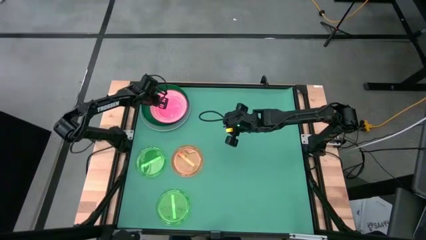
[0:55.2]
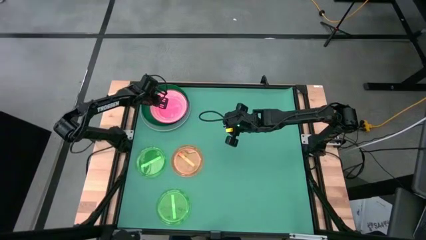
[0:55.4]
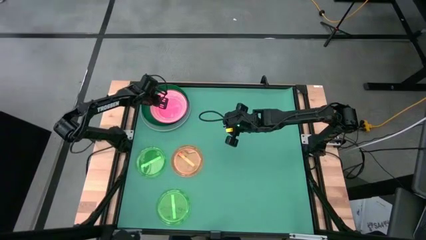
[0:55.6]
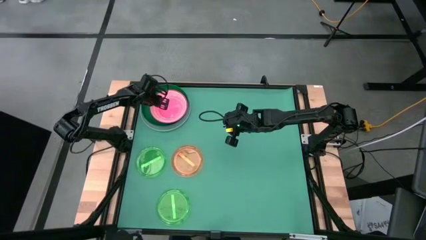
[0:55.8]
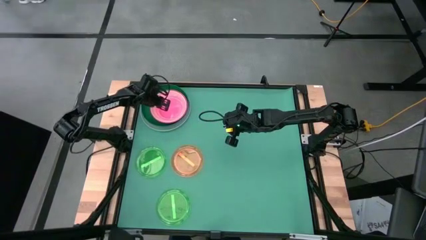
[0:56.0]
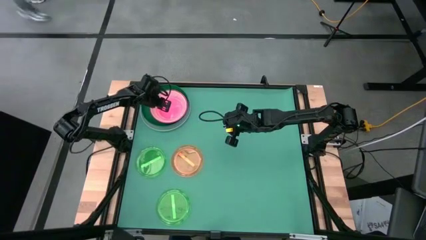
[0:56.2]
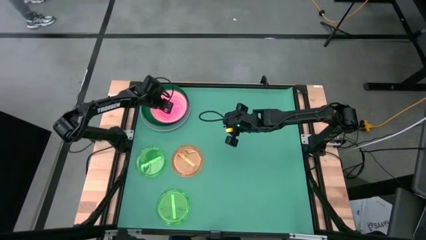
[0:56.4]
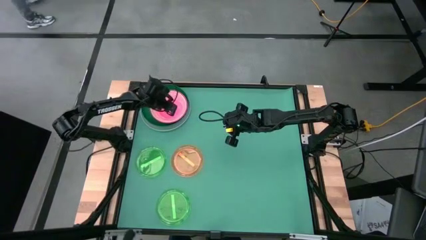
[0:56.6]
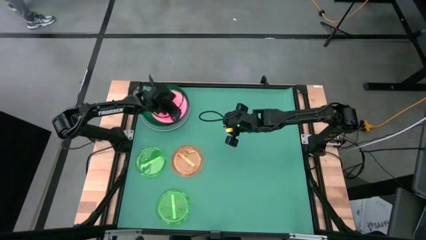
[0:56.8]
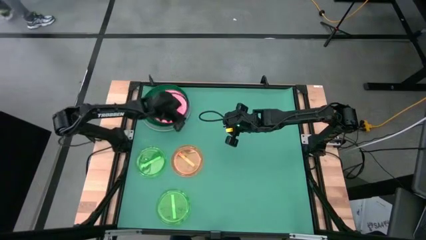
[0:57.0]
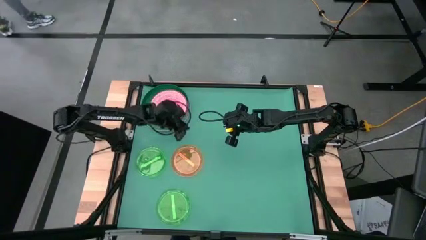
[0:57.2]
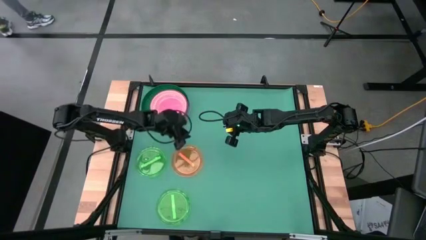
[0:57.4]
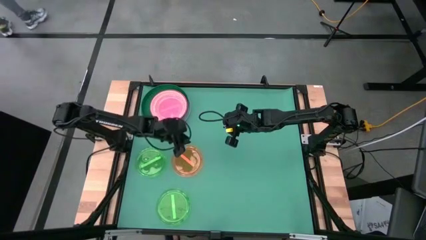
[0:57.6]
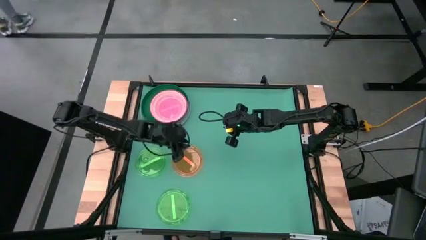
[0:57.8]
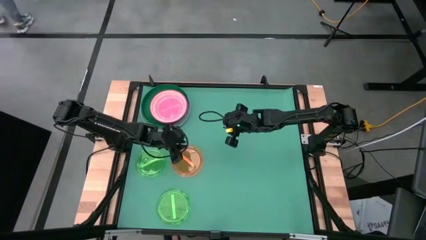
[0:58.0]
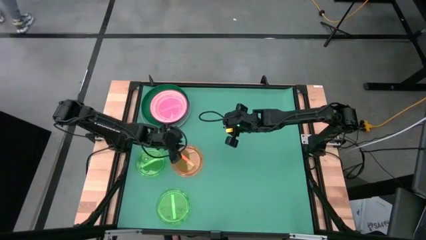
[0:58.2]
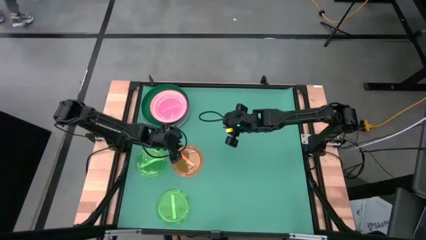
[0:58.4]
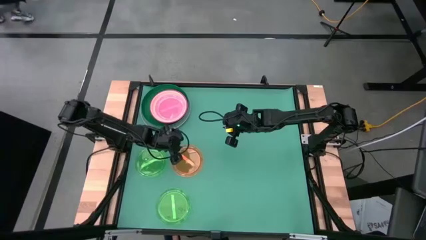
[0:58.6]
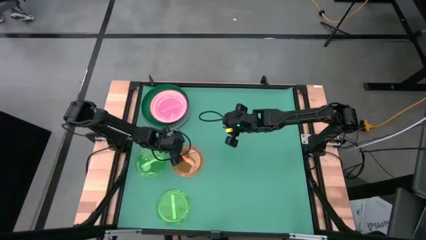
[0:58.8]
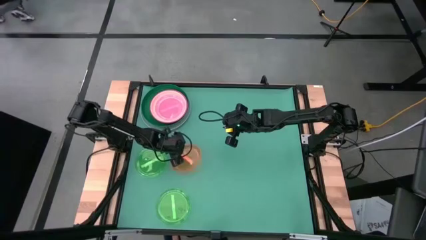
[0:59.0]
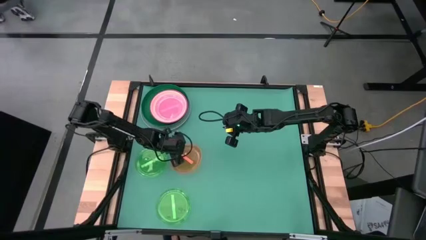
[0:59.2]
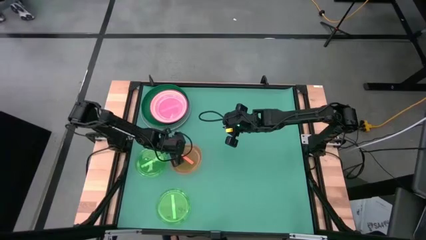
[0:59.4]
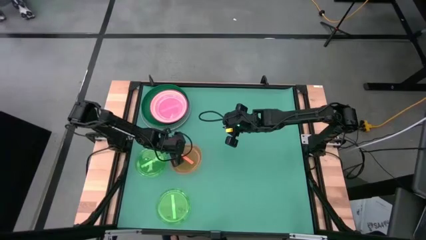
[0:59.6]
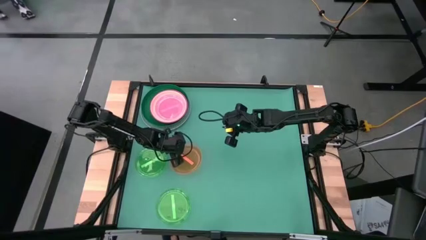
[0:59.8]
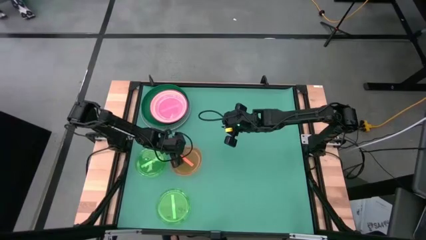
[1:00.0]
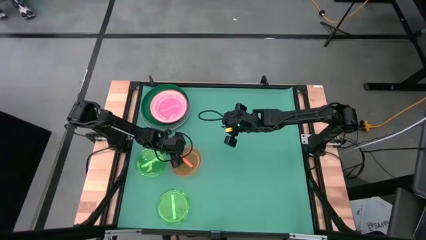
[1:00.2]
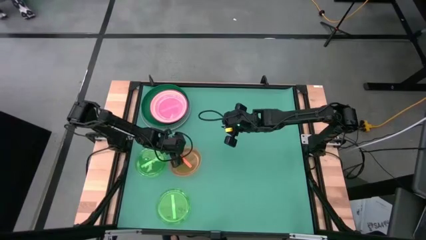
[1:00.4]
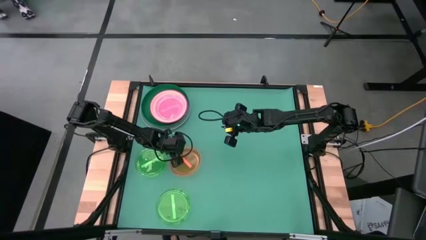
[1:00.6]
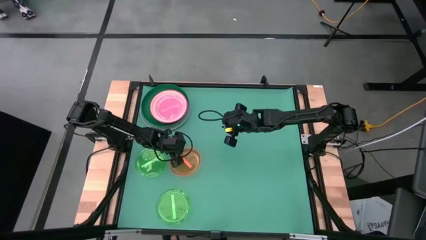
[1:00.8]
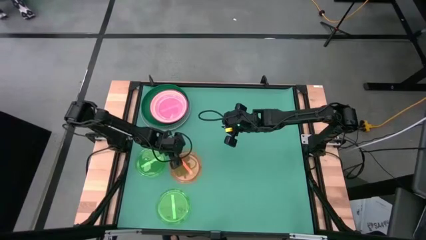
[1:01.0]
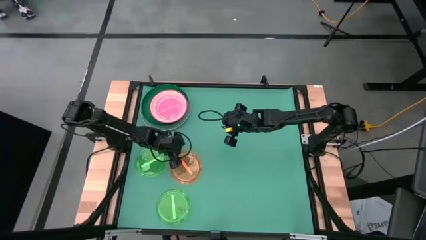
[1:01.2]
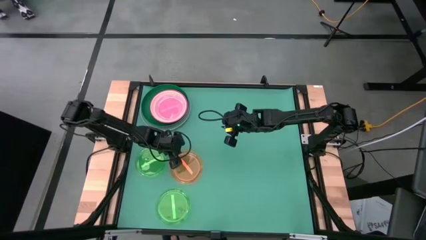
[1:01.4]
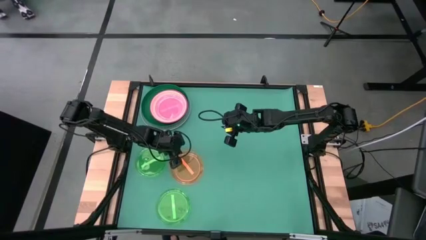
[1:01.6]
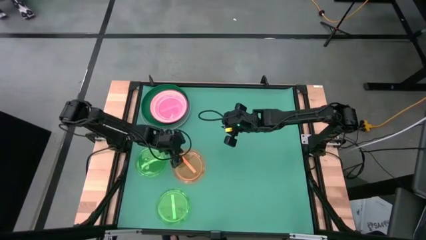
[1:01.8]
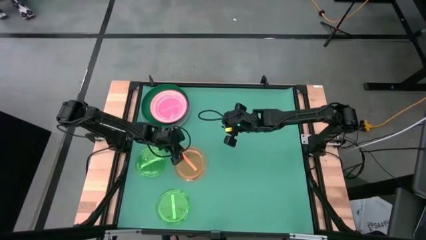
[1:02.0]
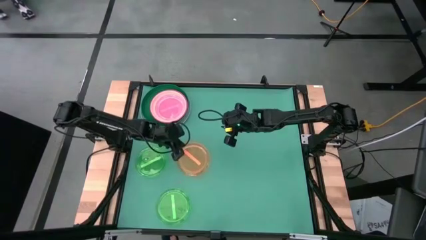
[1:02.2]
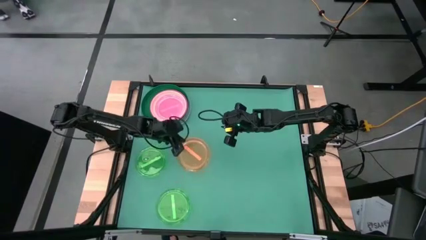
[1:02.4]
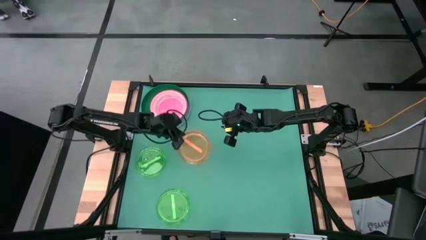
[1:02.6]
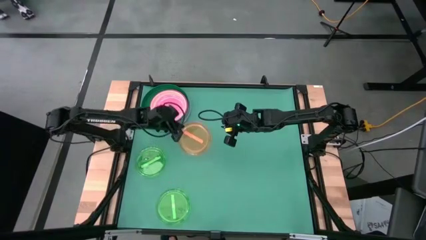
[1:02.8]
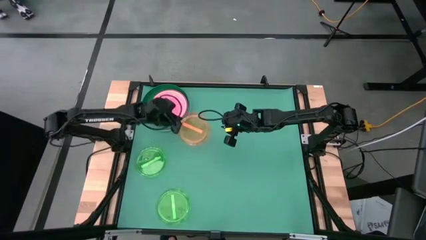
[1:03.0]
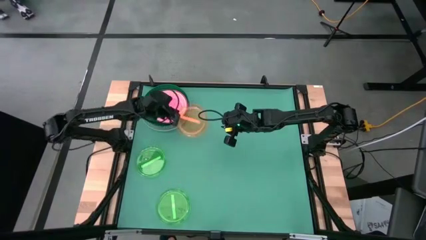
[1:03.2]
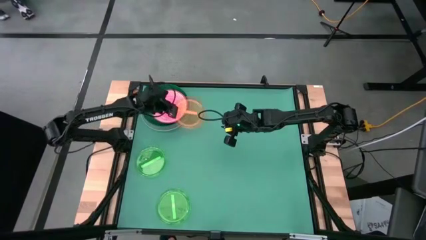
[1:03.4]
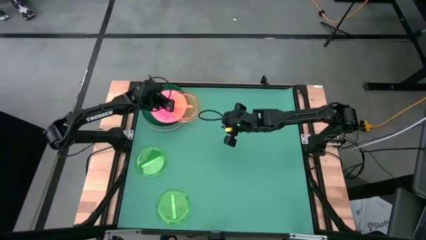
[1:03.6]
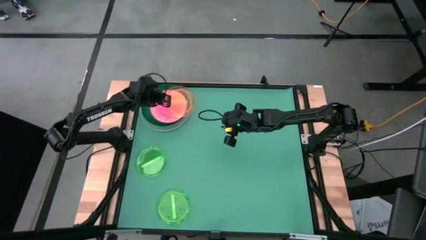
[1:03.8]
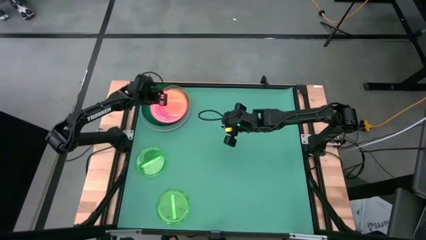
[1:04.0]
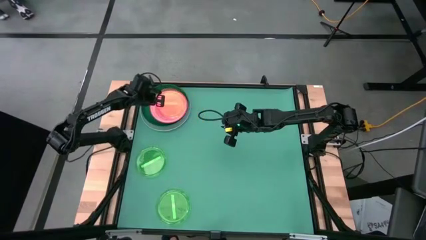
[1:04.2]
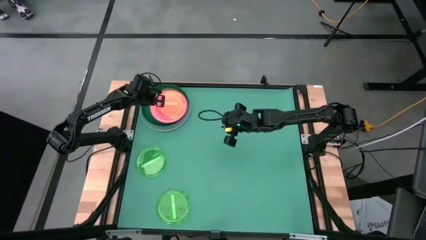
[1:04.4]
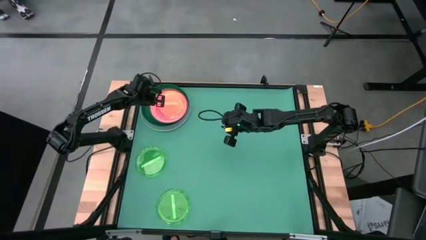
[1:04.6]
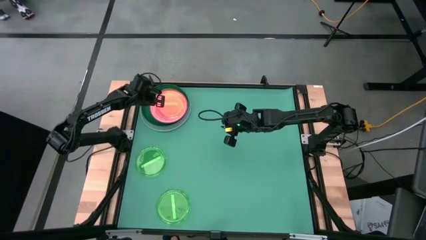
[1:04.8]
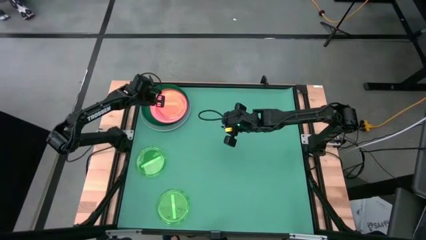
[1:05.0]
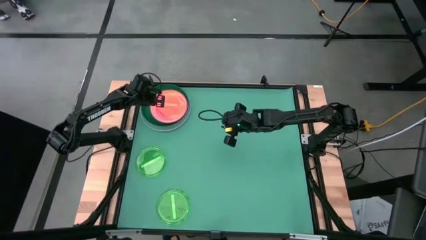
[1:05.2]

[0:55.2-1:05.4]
Task: Stack plastic plates
Stack the orange plate on top of the pink plate

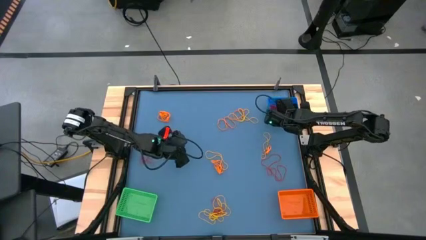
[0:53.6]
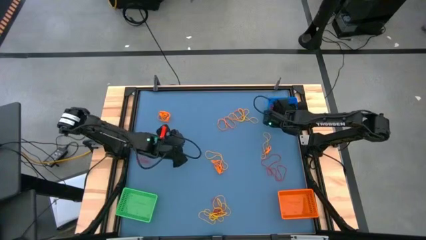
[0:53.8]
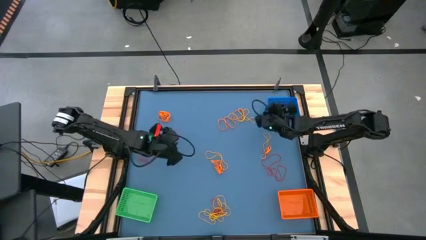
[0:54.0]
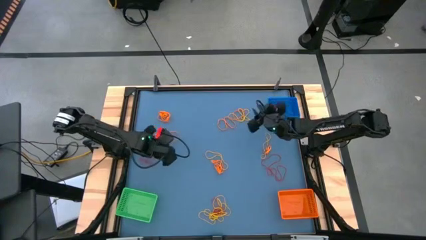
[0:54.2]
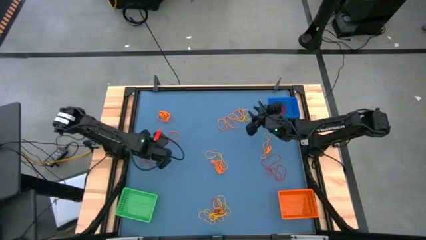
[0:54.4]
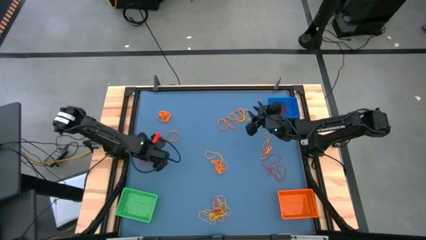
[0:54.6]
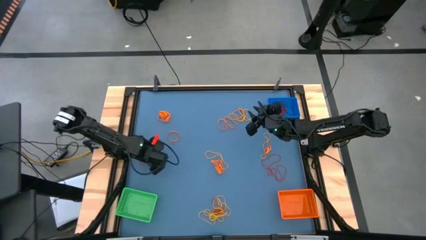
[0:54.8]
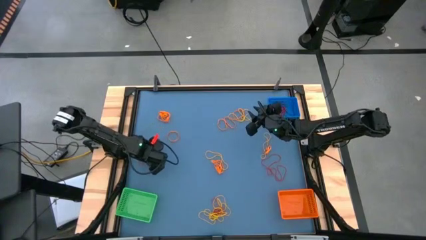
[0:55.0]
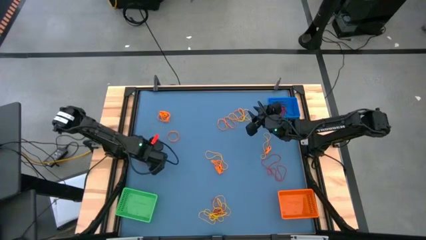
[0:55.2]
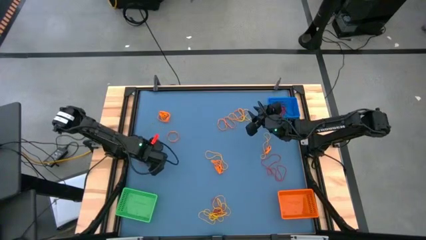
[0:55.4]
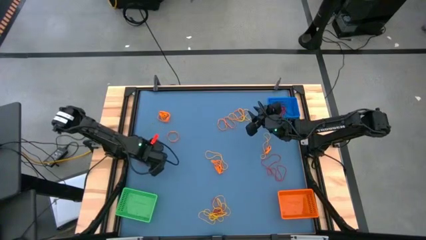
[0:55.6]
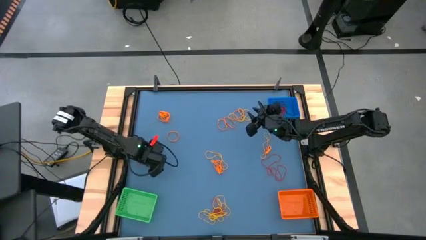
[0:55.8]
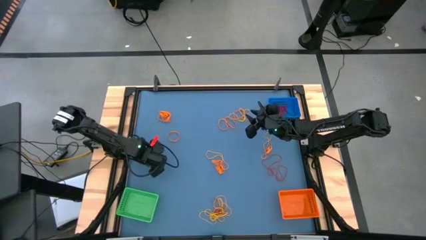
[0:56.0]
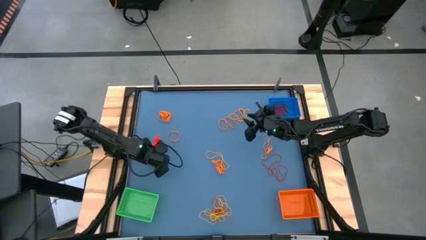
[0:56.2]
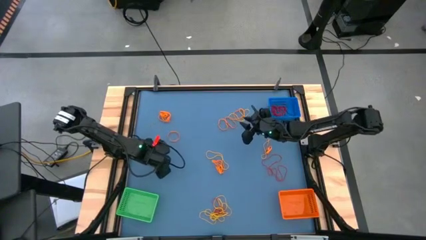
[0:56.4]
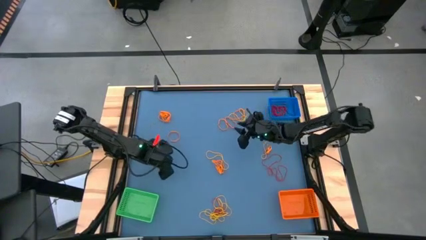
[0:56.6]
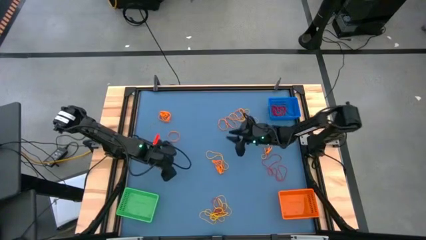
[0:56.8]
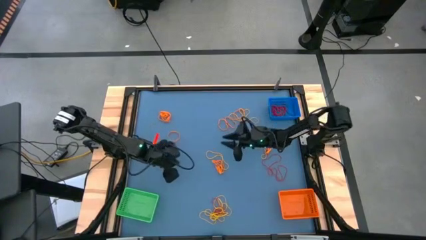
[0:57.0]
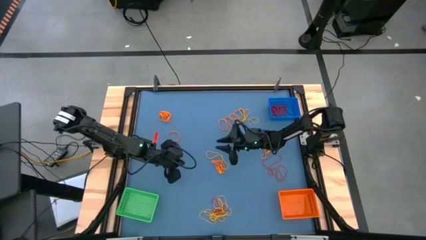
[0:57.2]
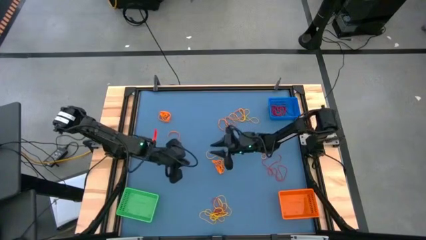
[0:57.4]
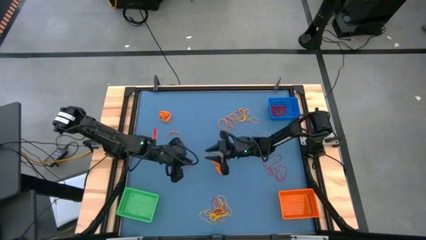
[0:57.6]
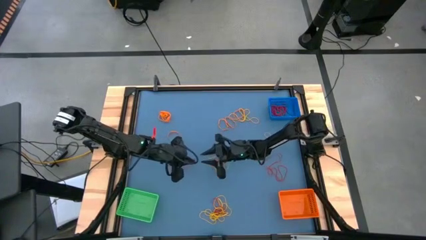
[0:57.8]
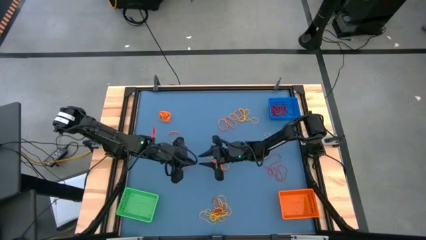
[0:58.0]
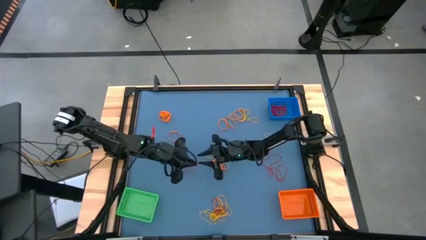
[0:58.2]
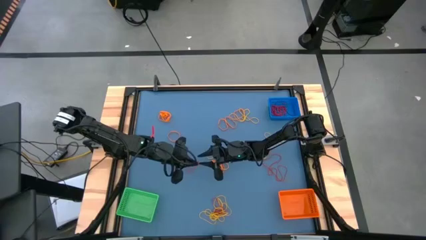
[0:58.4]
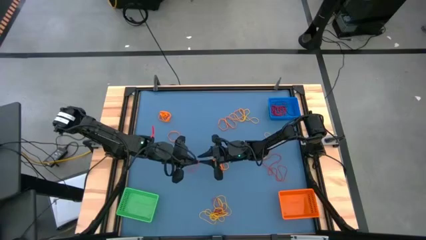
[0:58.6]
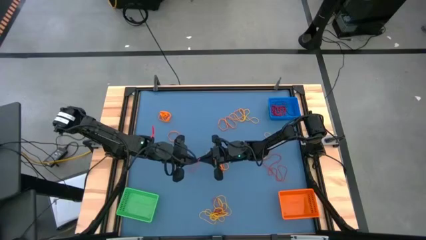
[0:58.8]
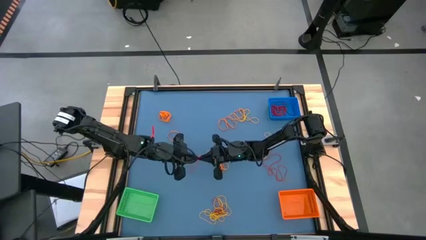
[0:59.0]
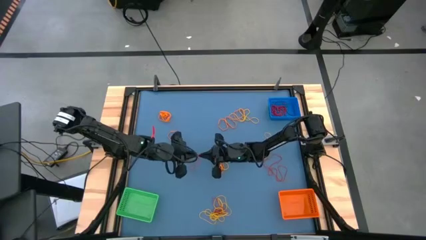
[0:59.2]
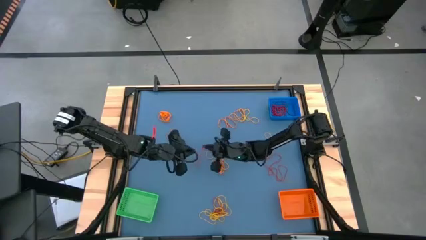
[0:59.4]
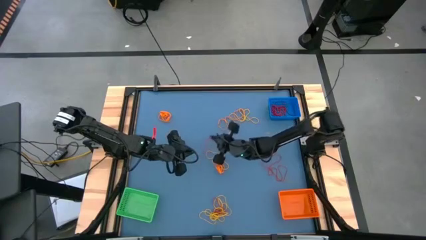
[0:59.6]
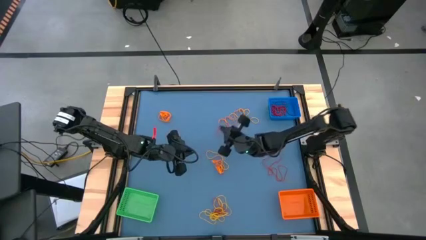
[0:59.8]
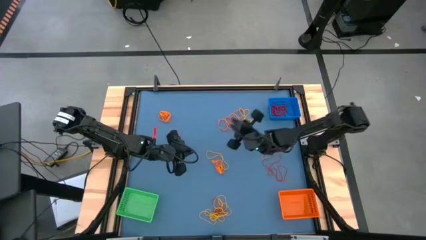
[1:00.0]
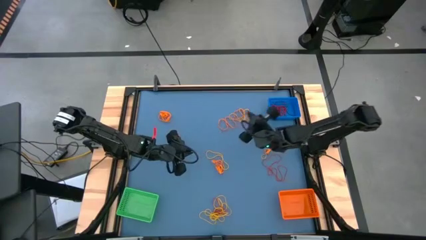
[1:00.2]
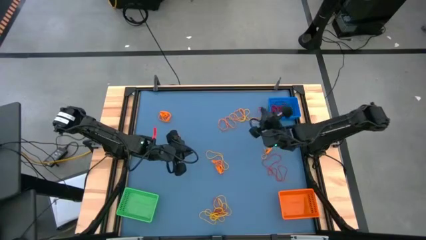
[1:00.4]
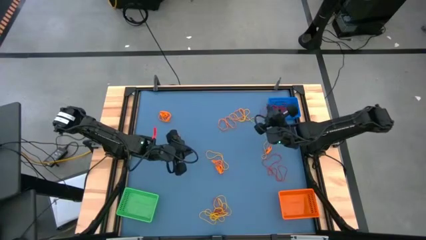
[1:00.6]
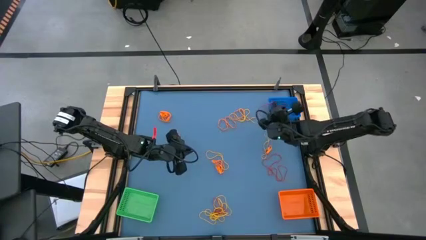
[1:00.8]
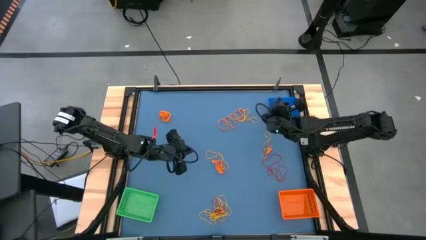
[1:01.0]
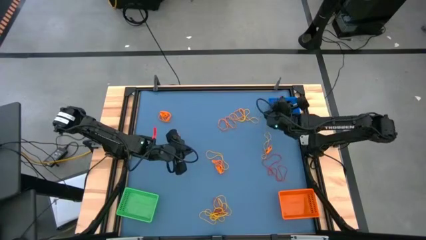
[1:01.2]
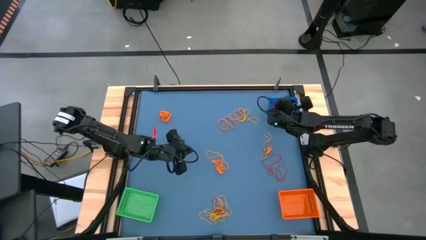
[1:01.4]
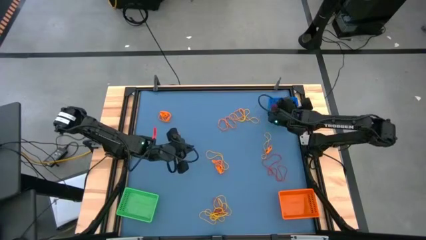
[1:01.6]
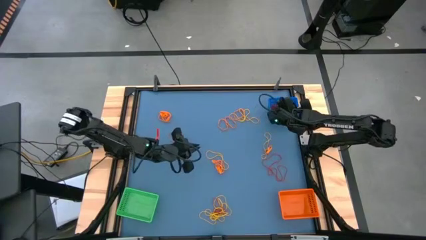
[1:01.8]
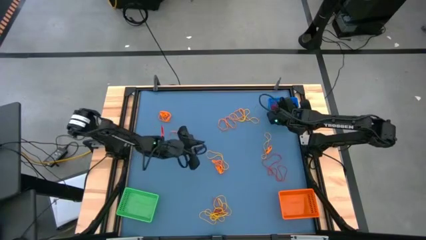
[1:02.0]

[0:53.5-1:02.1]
Task: Sort rubber bands into baskets
Put the red rubber band into the blue bin
